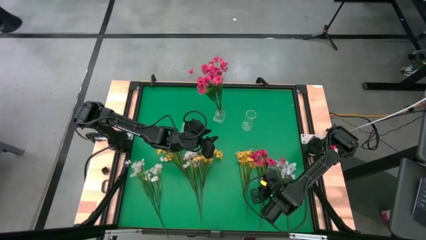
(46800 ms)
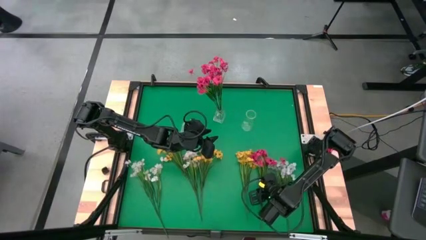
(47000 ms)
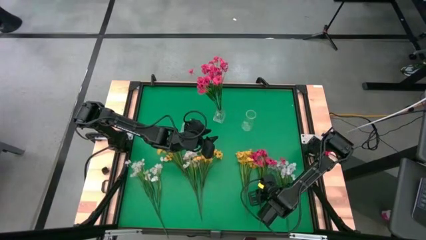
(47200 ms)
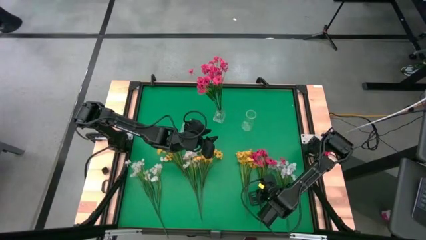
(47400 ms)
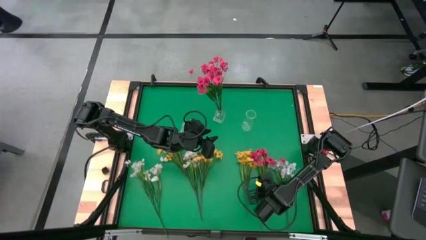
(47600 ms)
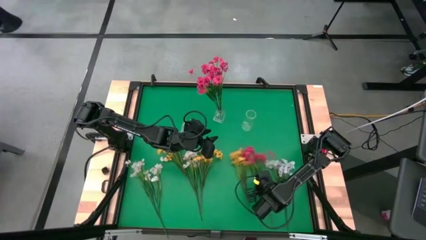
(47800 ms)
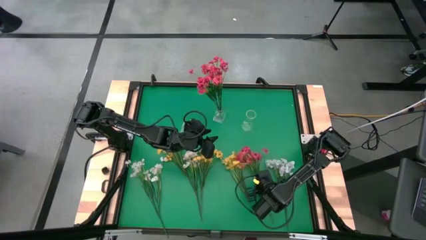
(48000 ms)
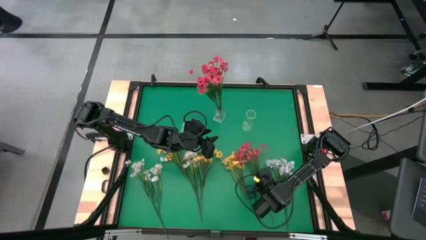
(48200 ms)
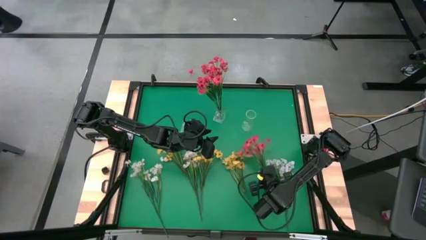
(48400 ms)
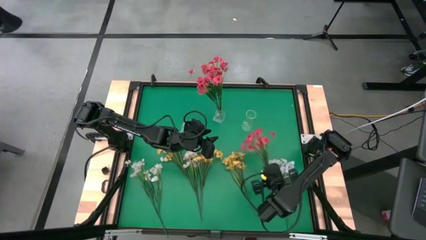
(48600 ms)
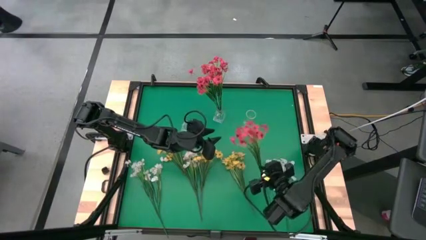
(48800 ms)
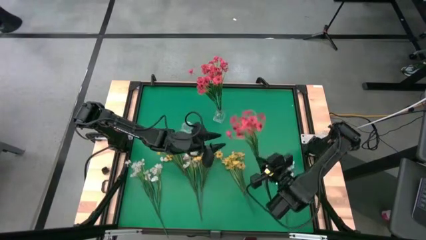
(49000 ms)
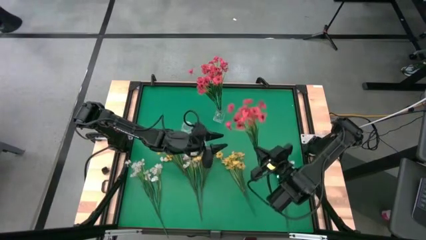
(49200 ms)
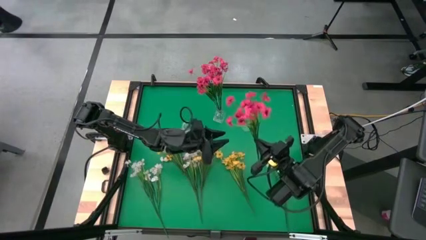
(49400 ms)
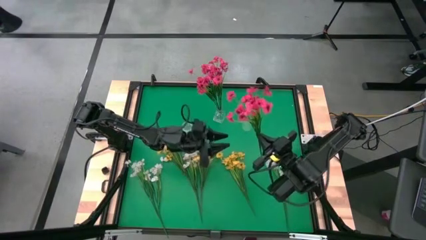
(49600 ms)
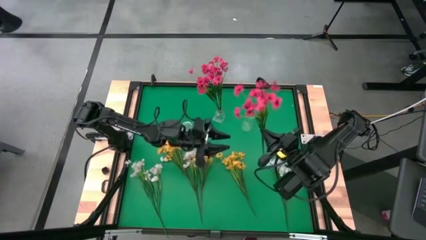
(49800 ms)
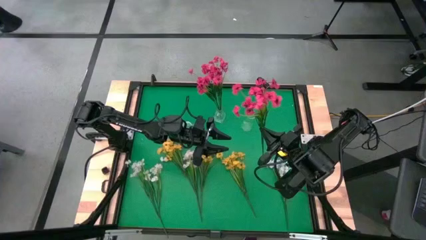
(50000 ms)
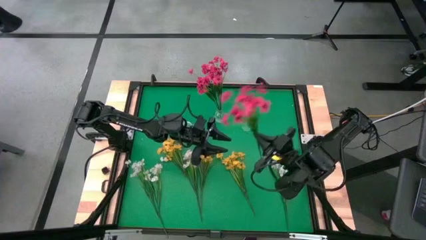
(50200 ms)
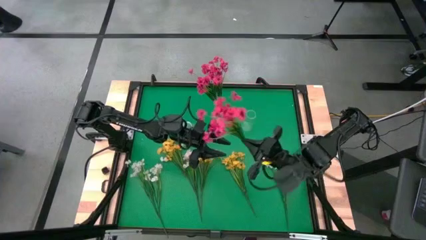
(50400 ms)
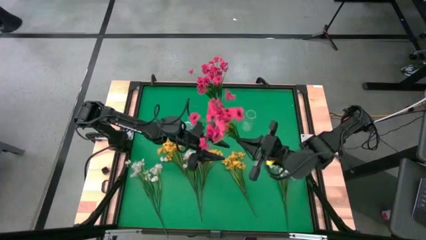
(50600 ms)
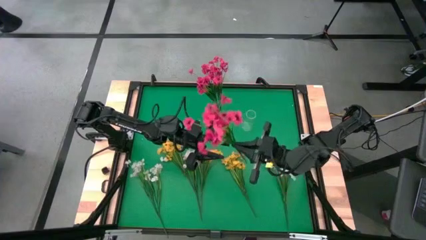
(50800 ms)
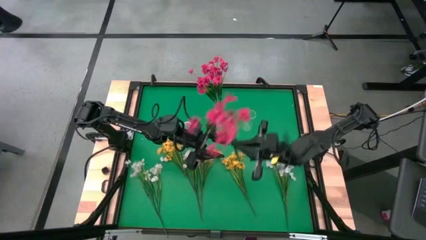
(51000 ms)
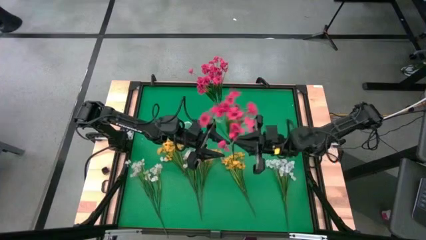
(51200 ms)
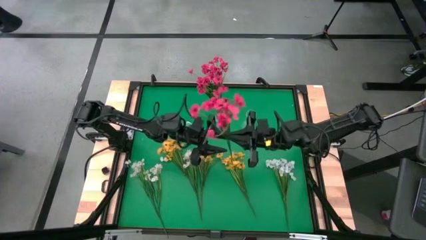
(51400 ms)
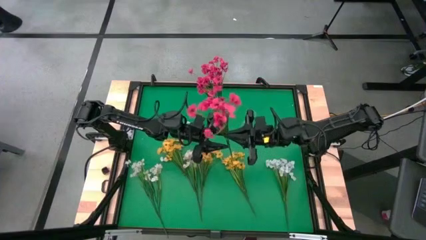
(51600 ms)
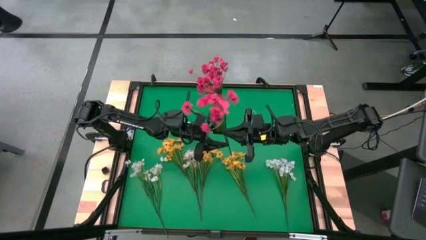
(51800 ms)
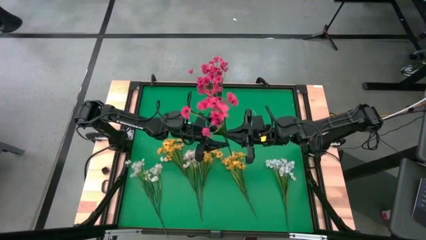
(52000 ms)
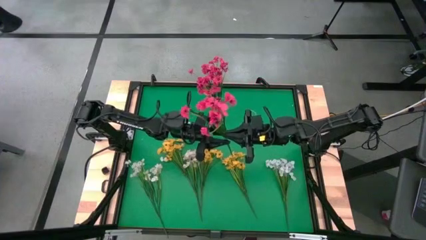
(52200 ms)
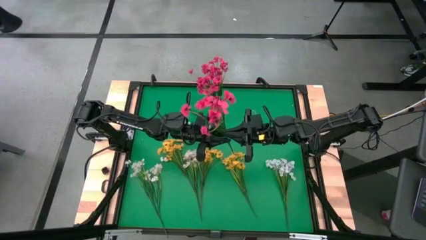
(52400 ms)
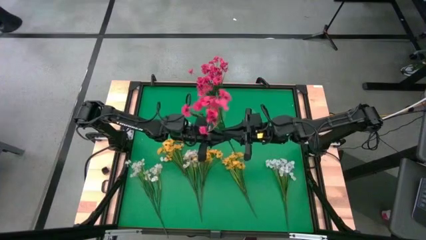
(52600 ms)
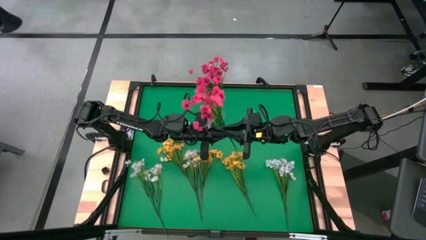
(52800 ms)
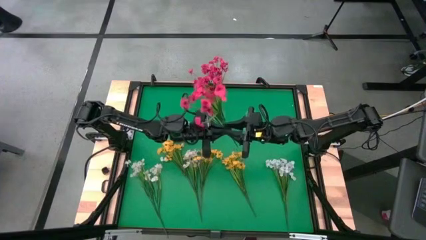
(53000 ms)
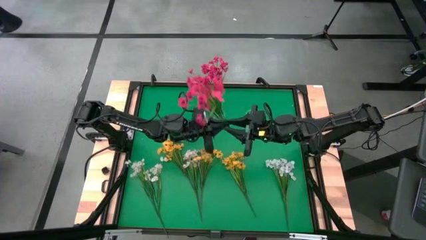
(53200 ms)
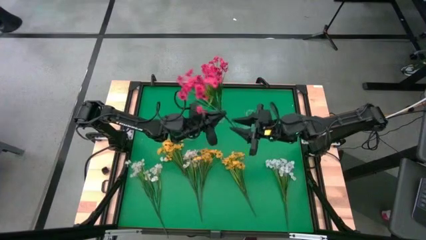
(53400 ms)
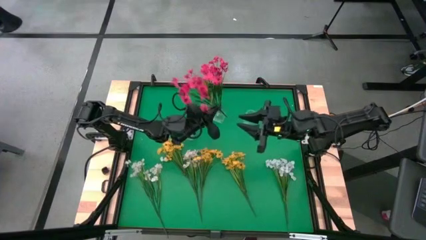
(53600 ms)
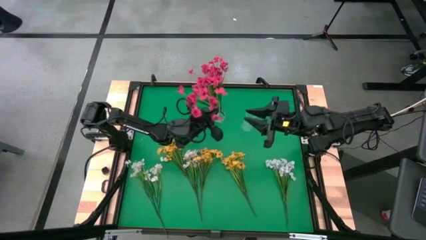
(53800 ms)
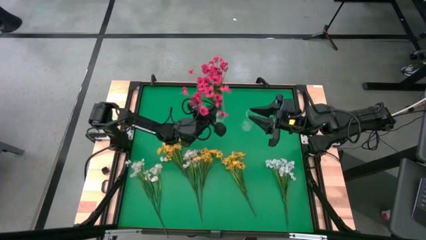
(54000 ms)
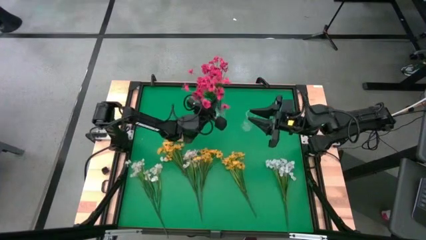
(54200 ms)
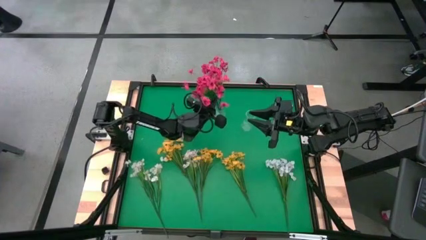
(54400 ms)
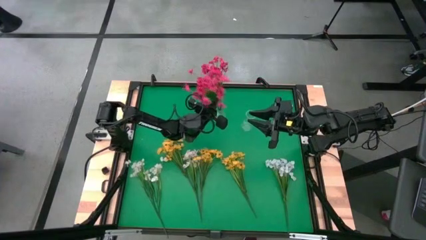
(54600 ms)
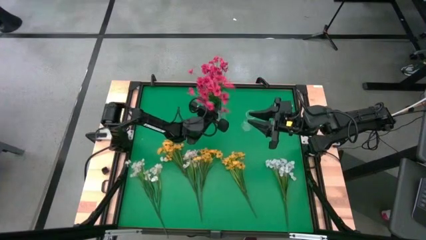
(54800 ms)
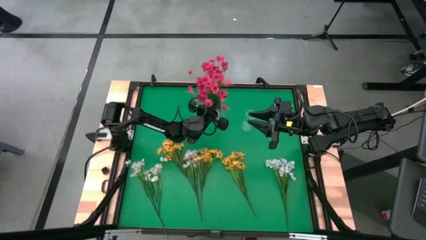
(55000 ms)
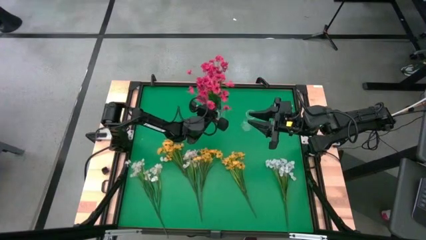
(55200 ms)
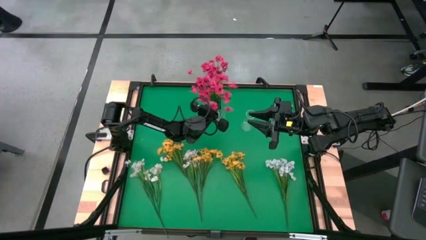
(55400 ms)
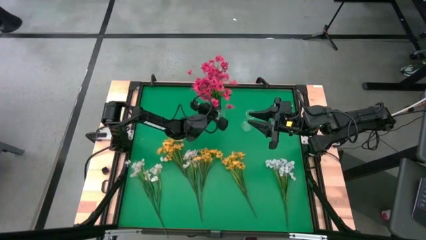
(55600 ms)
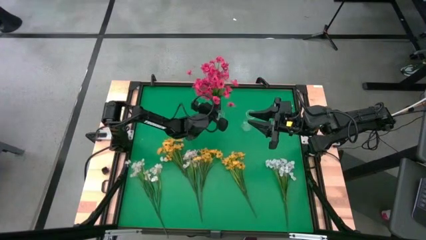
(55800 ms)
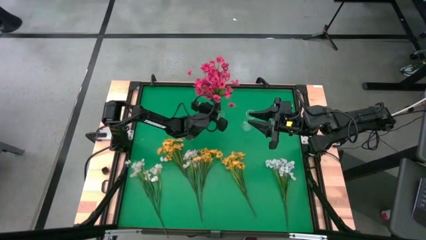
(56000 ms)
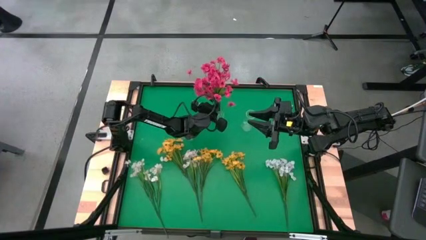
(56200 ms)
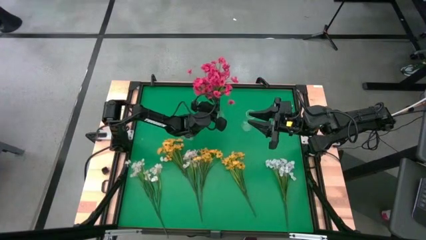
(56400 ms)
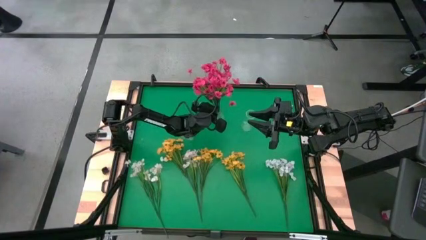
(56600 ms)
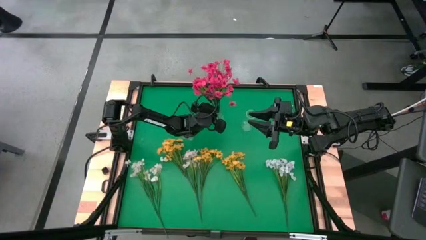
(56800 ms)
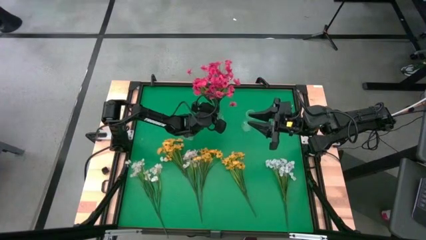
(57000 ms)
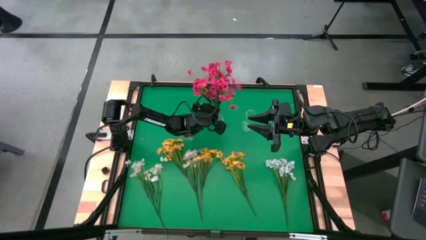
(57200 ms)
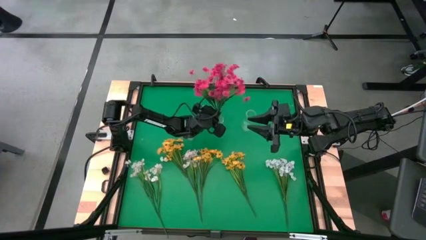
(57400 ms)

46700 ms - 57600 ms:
Task: Sort flowers into vase by color
Put the red flower into the center transparent vase

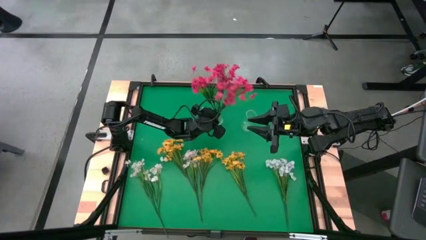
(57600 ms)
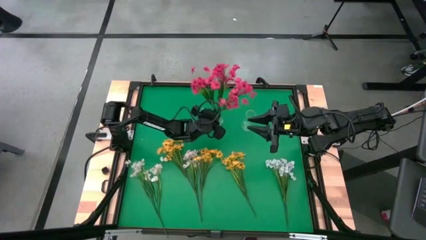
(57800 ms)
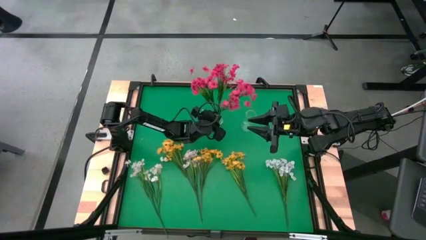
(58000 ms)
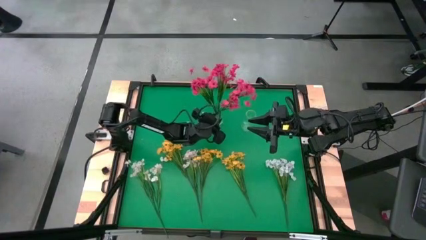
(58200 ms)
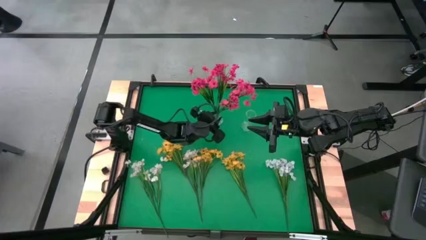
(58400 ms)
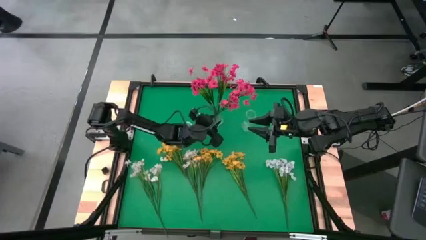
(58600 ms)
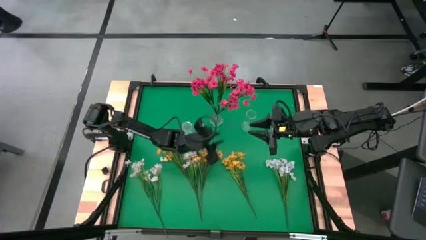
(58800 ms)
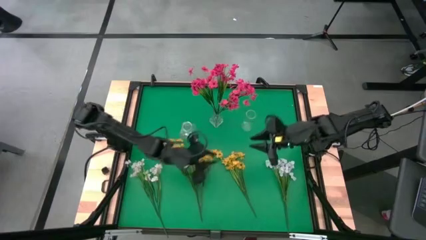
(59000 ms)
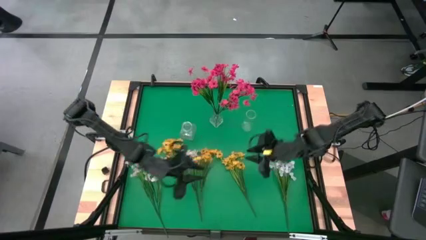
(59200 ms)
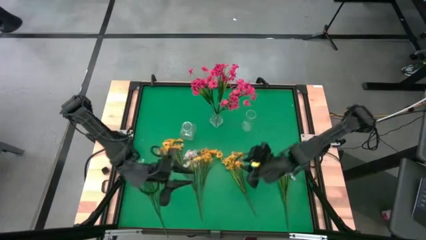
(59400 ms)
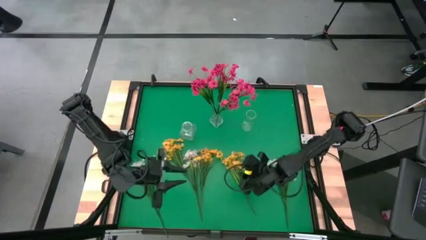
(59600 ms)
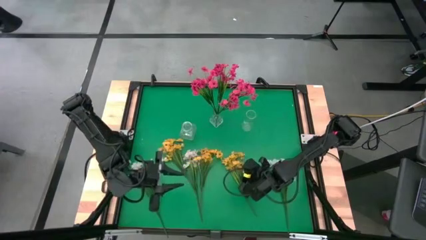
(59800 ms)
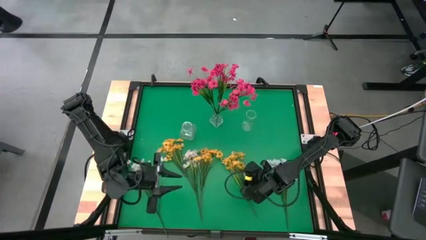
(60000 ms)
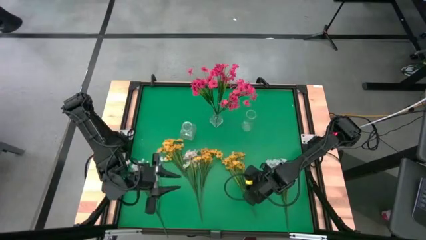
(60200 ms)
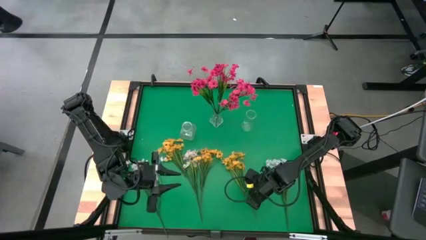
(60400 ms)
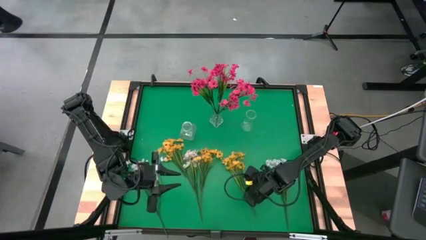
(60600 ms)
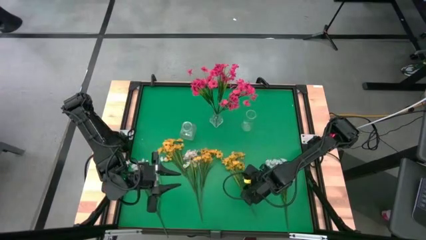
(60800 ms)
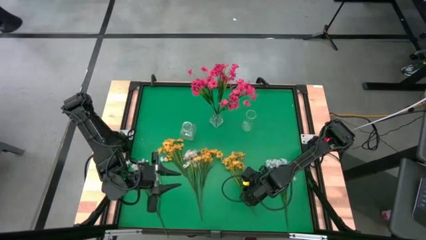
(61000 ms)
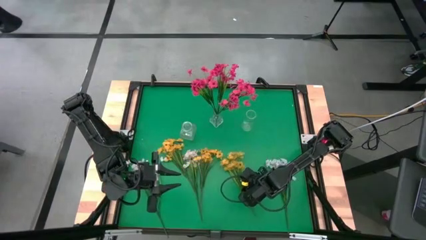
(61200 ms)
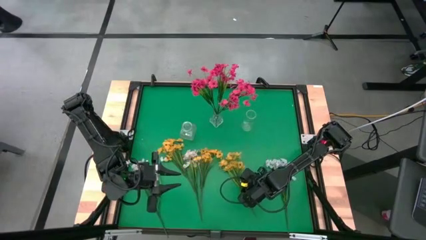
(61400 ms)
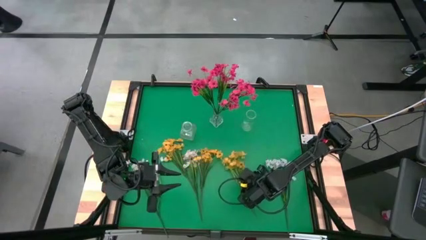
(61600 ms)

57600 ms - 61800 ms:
Put the right yellow flower into the right transparent vase
